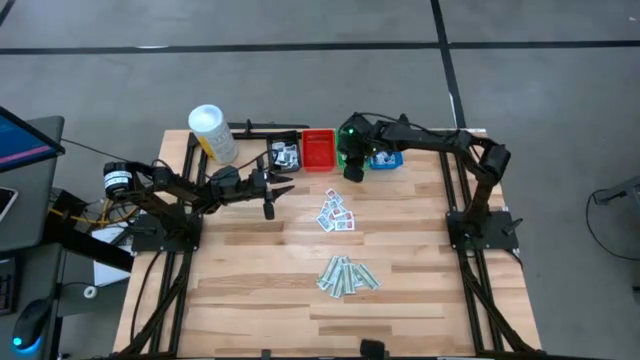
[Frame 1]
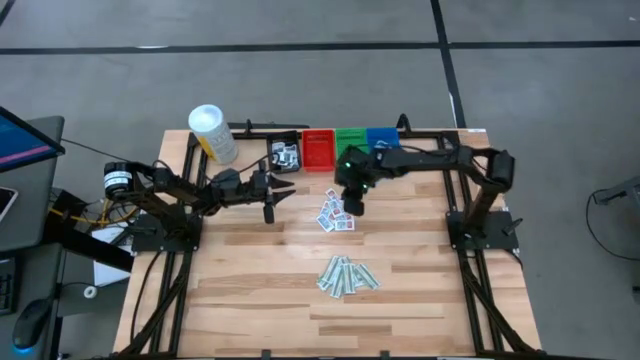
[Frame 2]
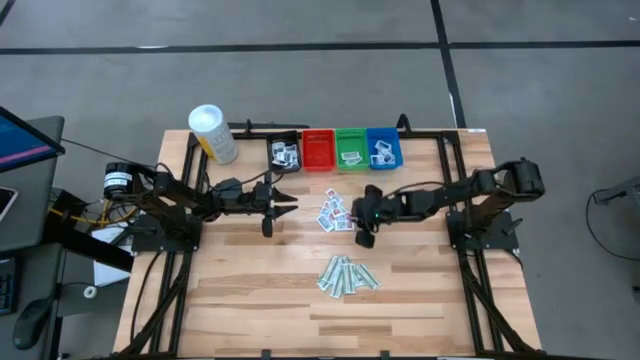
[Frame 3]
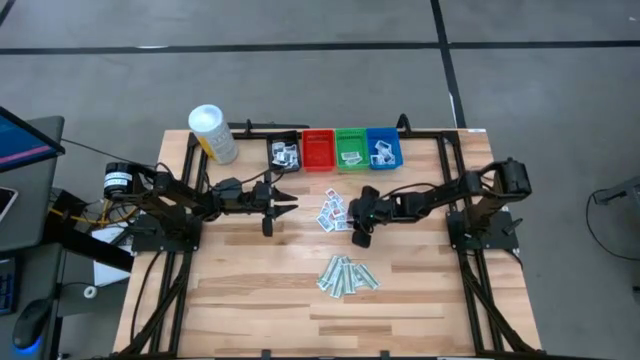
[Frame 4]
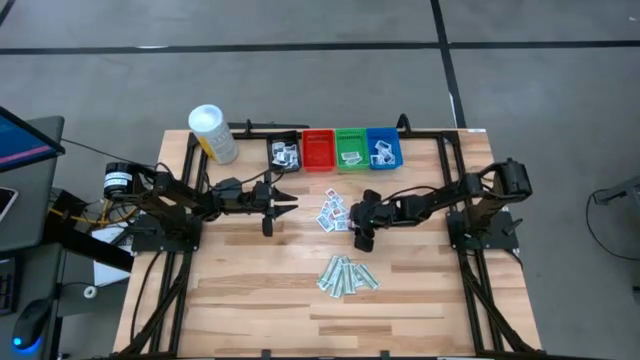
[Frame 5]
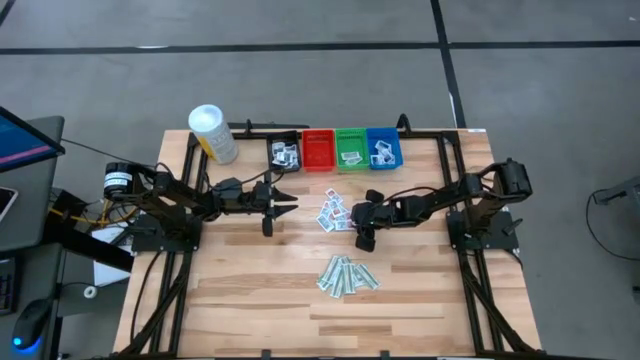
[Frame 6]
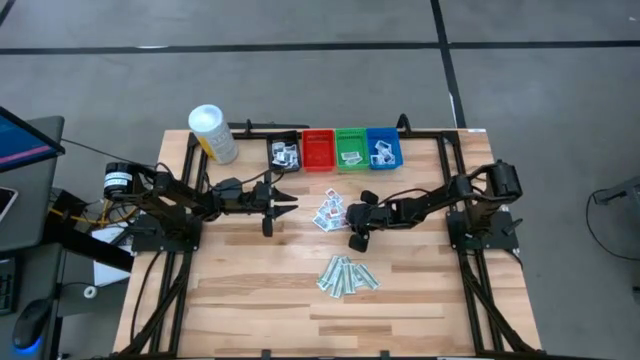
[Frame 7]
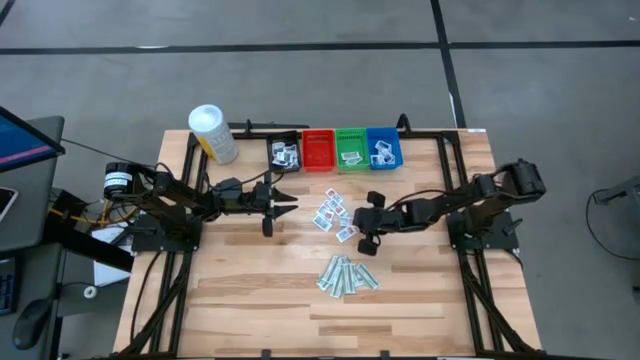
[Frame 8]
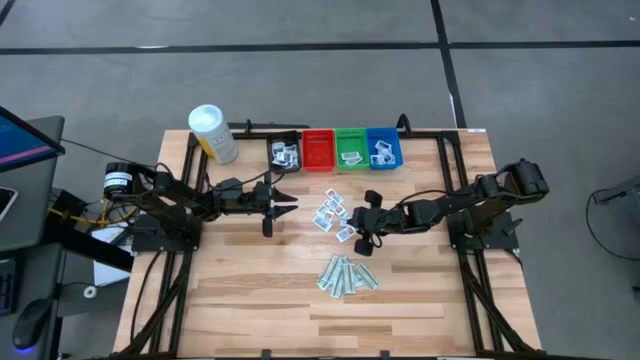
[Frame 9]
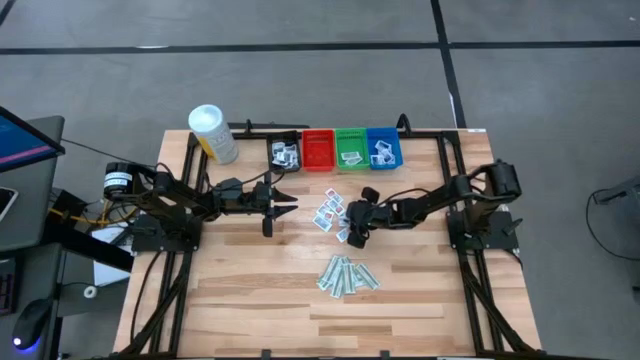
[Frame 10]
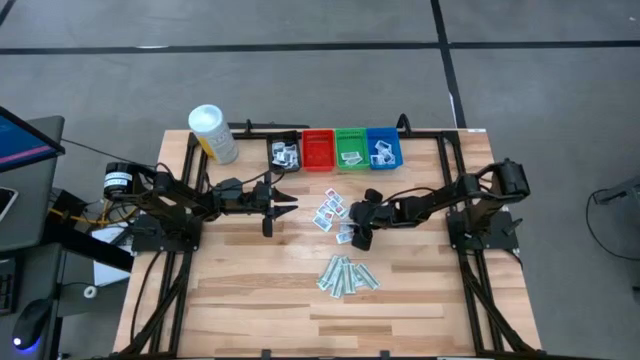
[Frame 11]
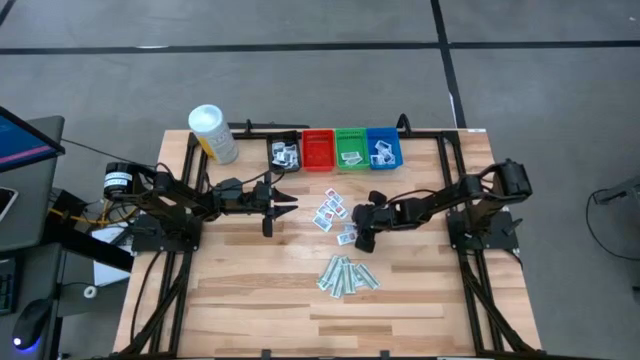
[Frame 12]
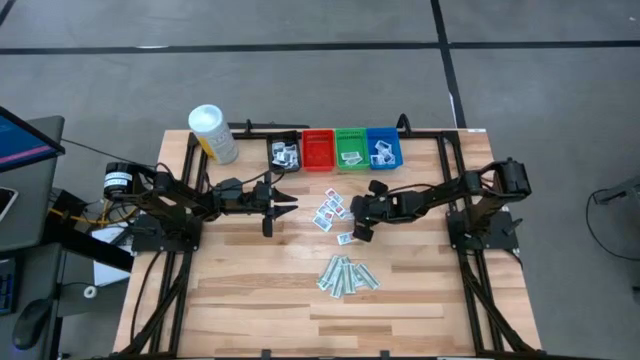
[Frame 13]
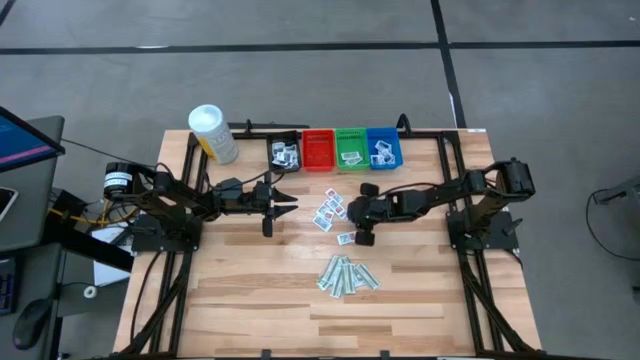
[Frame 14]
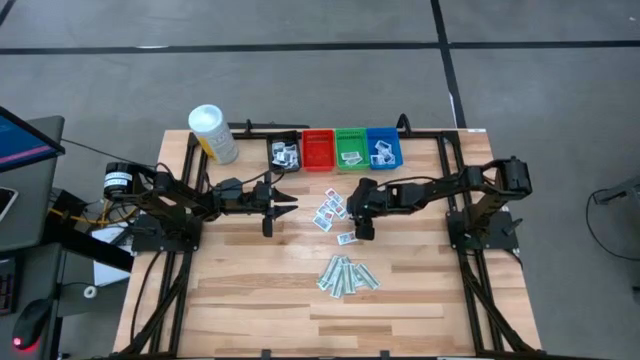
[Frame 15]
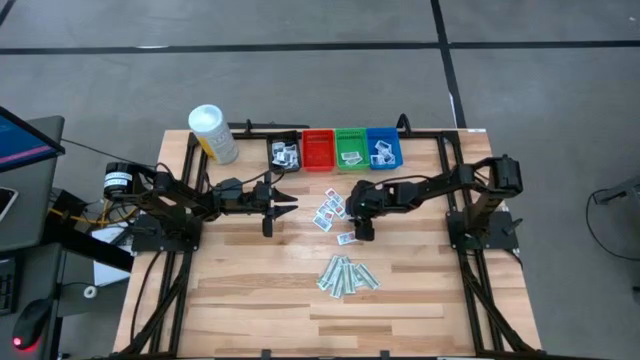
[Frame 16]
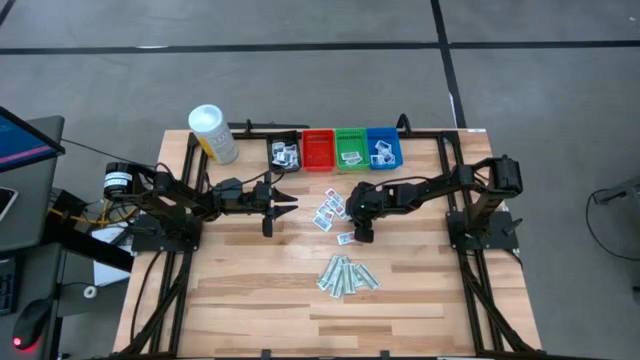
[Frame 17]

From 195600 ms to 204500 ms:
Task: Pick & Place First Aid Supplies
Put the orange ointment pack into the green bin

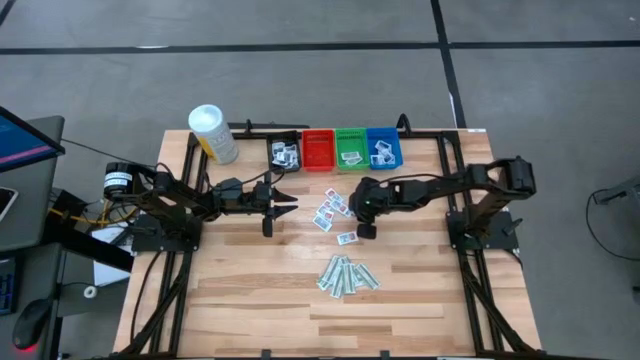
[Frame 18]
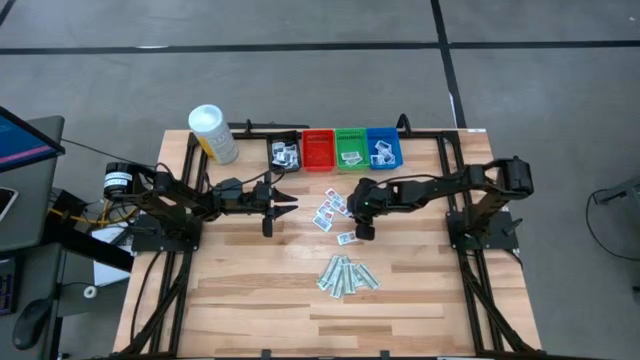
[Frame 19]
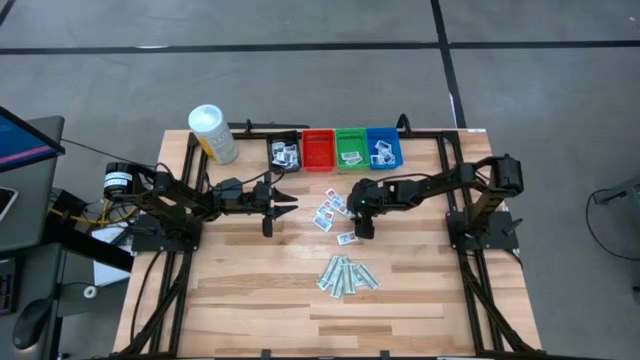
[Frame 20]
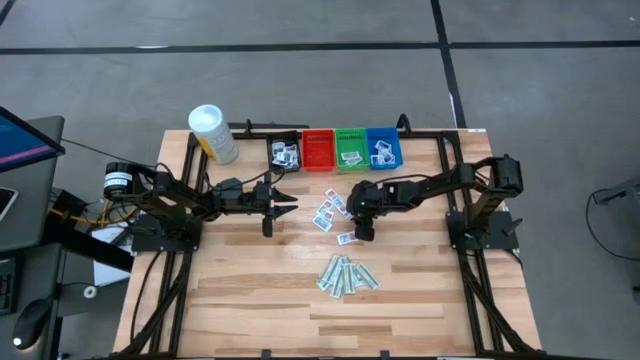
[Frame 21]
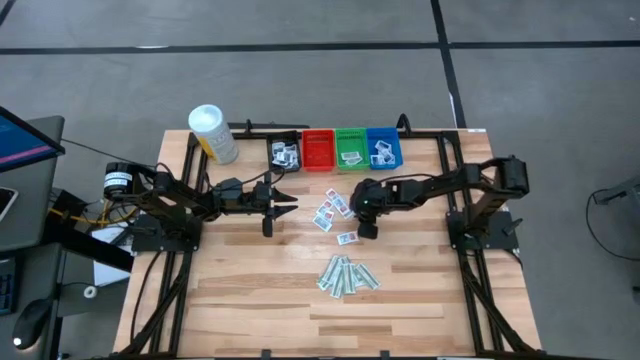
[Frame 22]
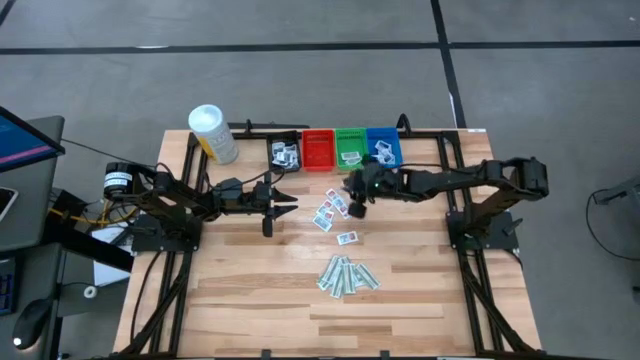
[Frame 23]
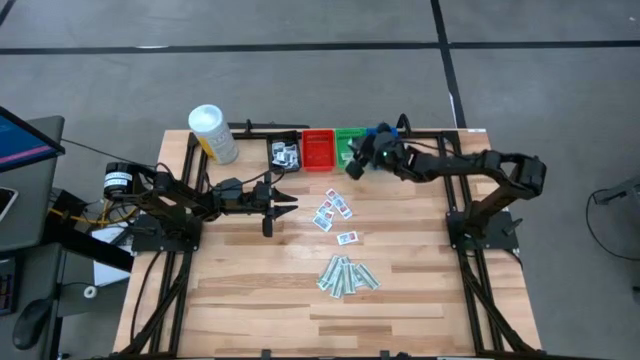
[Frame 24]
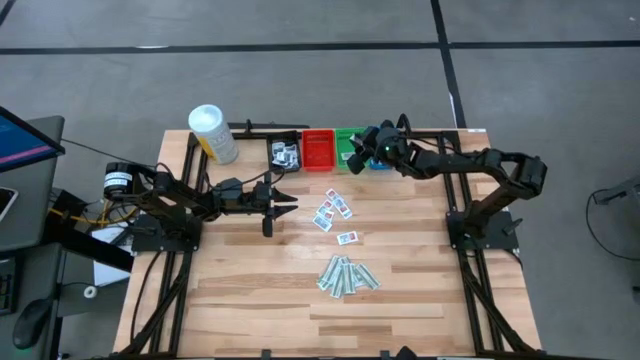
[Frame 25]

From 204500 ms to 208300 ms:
Put the orange ointment pack into the green bin

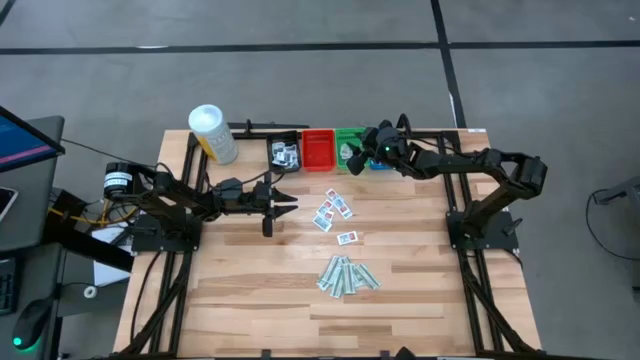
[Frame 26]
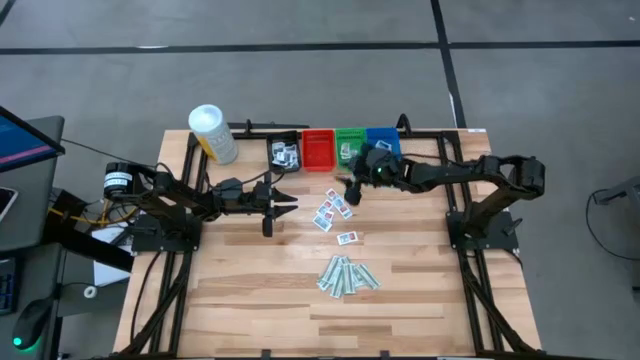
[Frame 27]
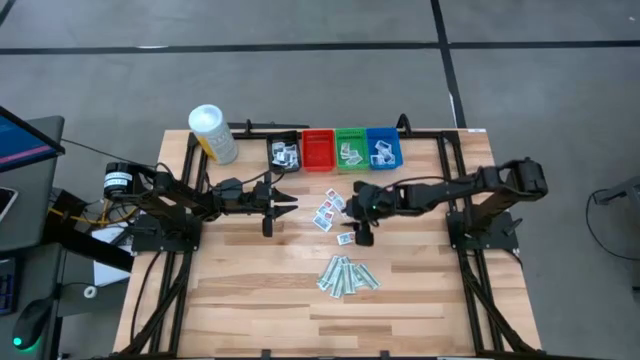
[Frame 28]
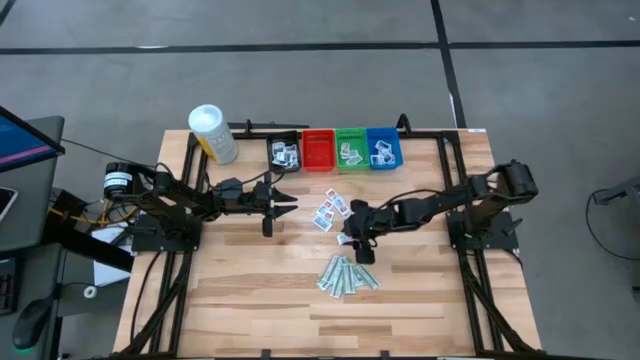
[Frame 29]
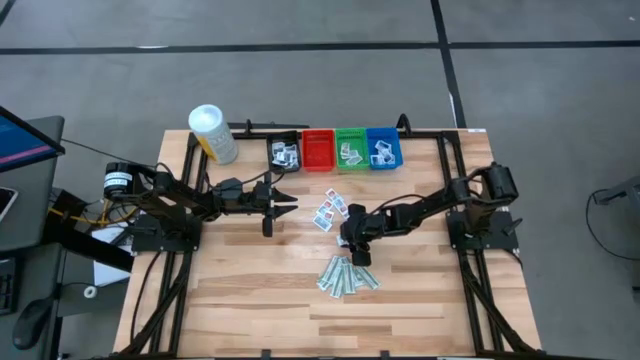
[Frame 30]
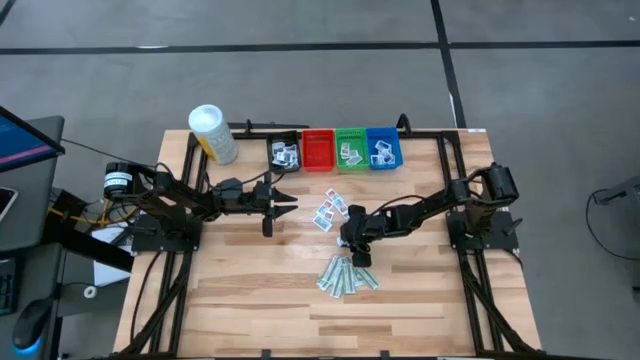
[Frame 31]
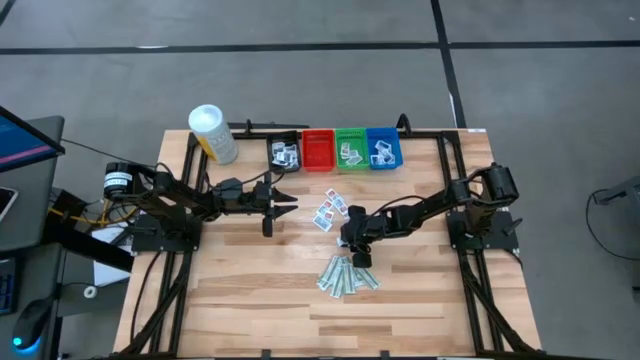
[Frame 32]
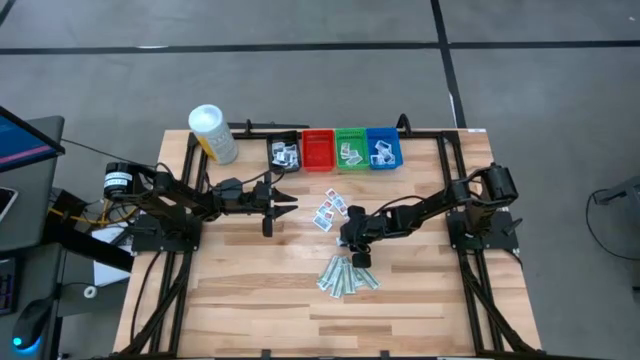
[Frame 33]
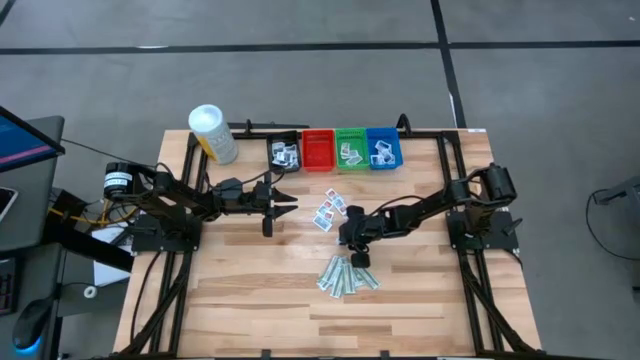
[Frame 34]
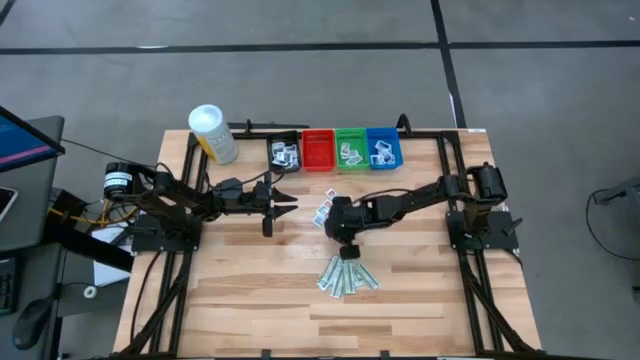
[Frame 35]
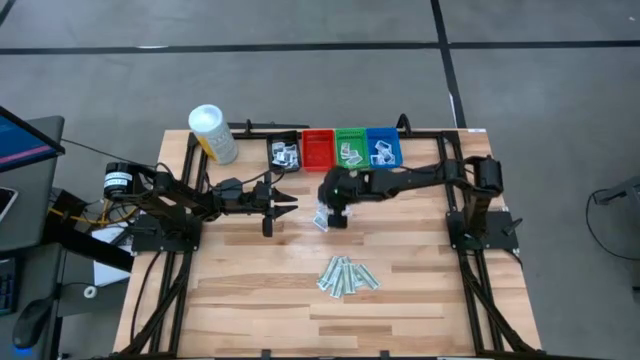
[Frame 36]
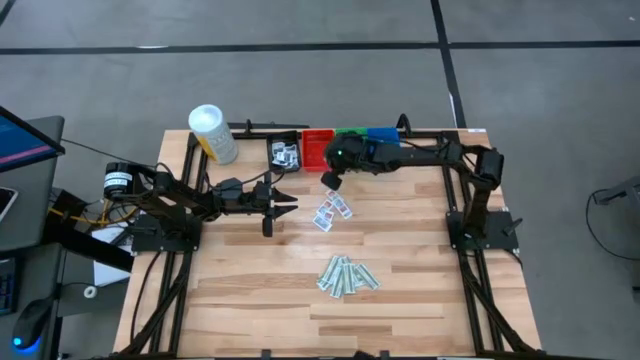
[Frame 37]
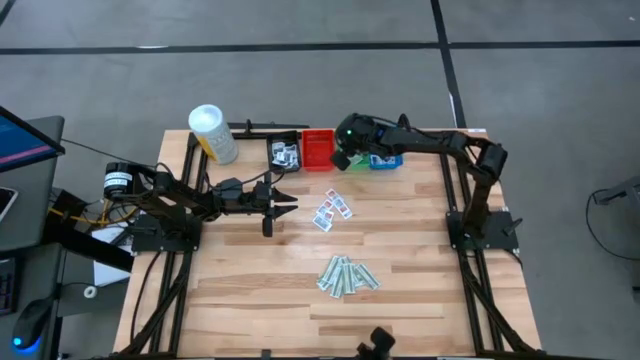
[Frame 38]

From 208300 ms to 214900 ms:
Put the orange ointment pack into the green bin

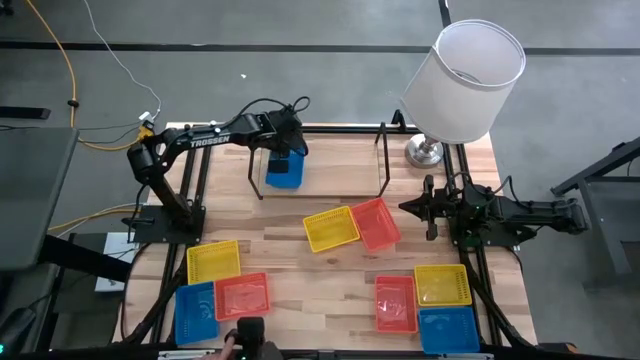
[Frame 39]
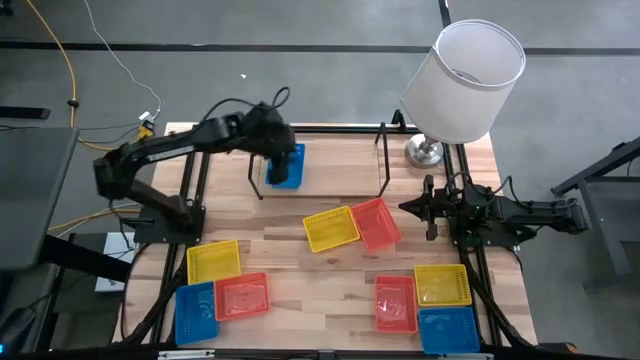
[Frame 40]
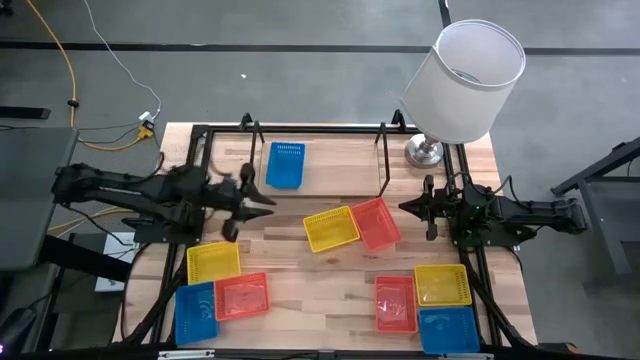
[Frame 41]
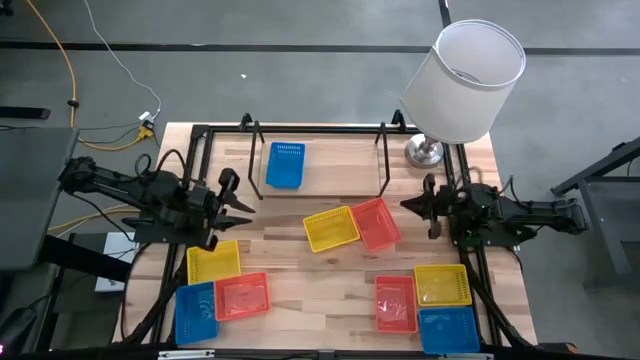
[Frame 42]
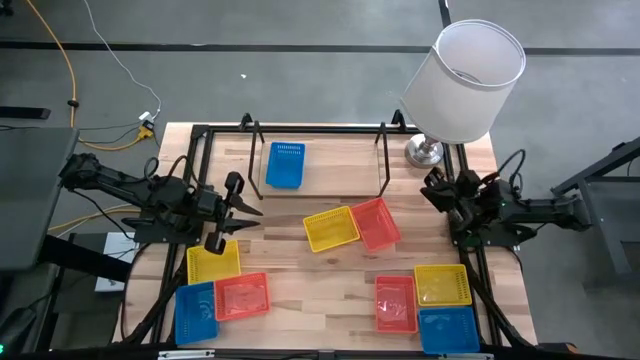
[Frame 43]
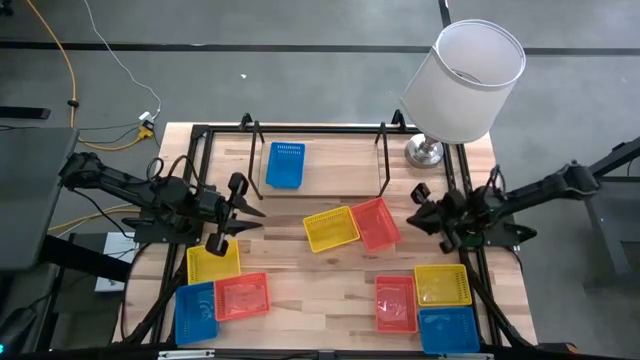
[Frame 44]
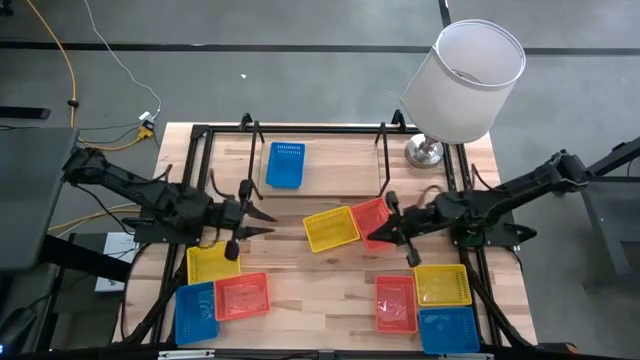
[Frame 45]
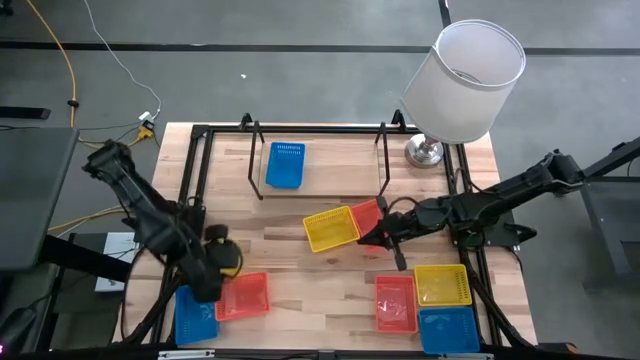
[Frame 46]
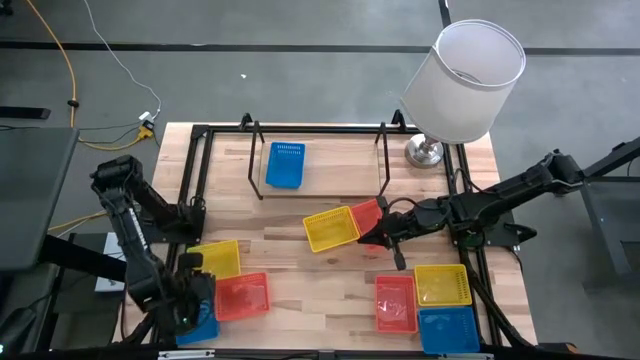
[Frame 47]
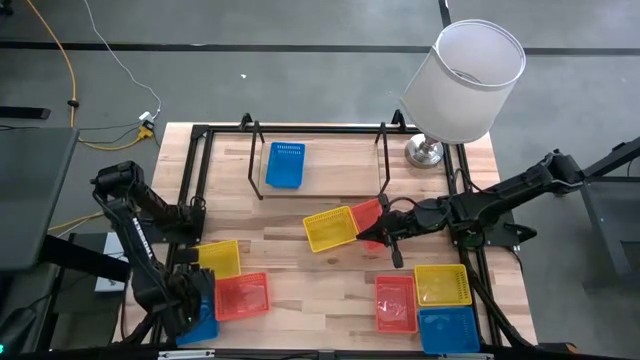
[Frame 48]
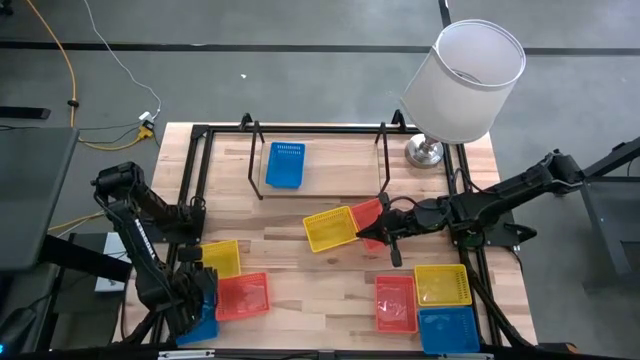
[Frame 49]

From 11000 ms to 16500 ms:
Task: Stack baskets on shelf by color
Adjust the left blue bin
